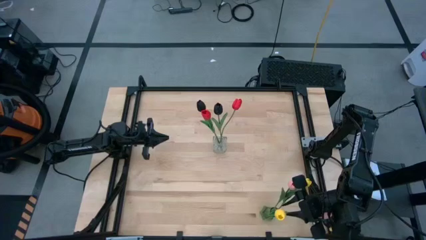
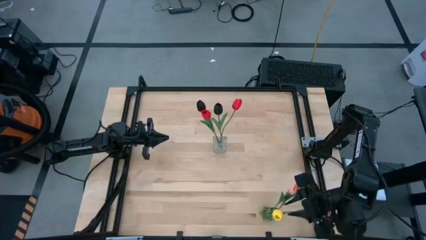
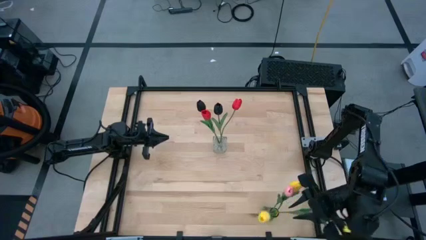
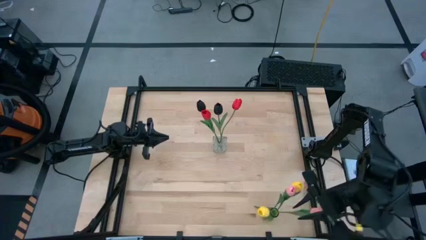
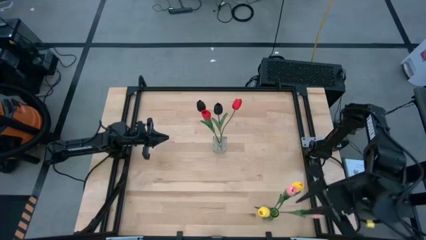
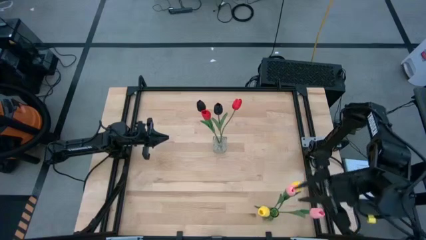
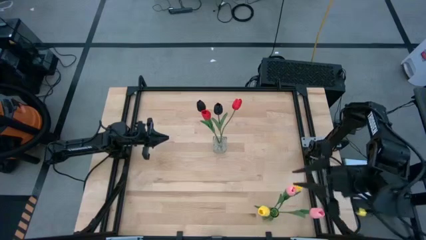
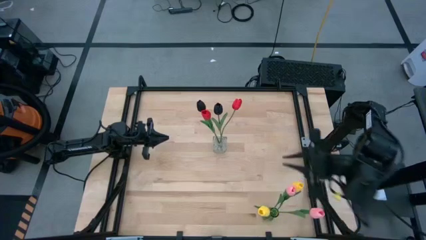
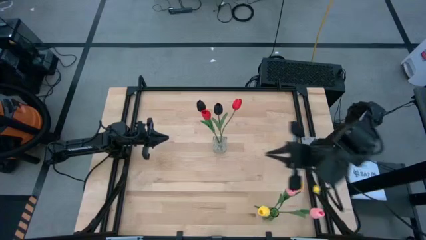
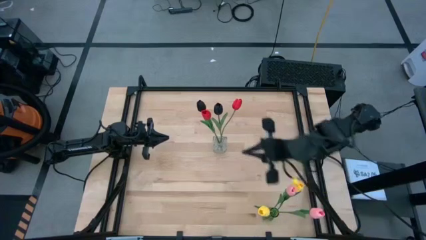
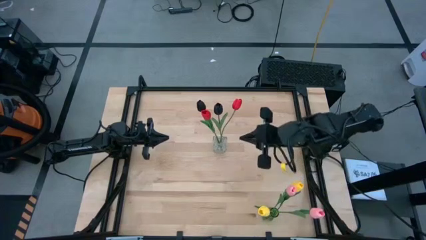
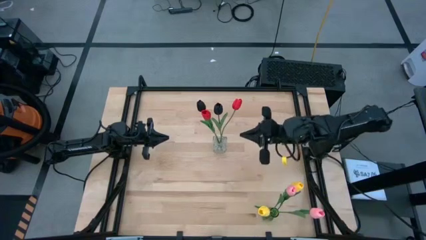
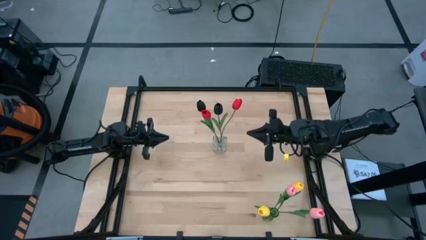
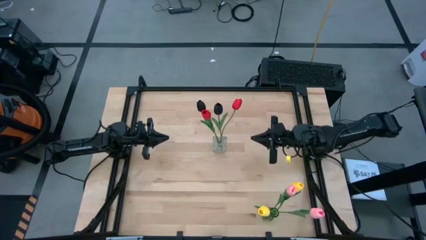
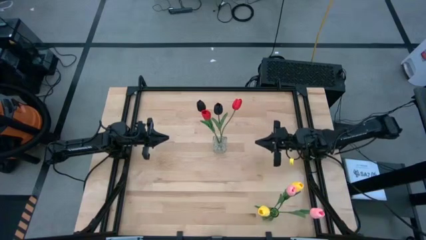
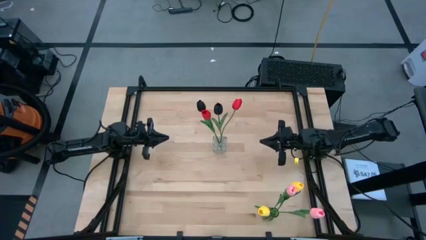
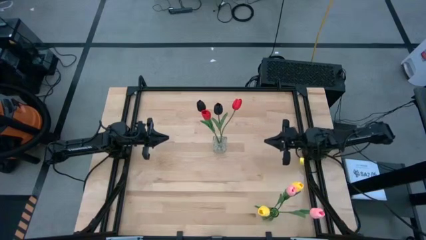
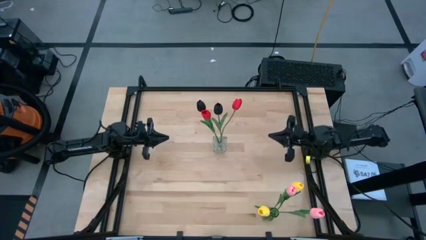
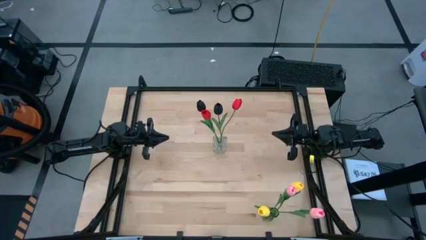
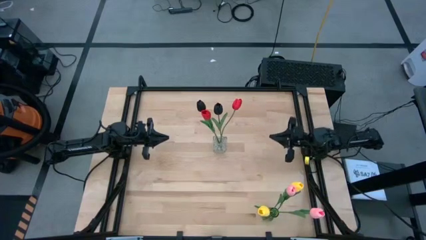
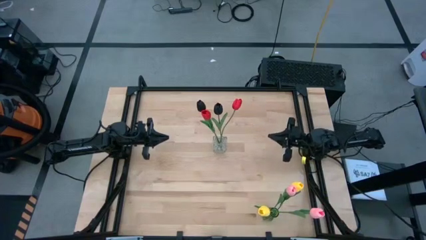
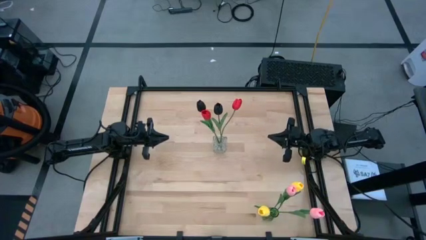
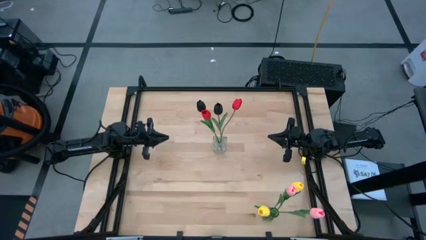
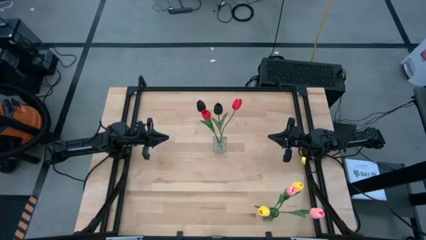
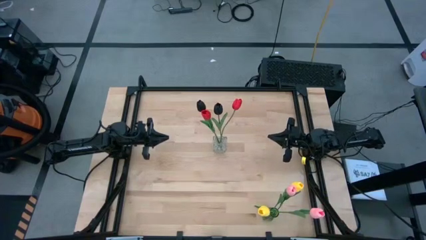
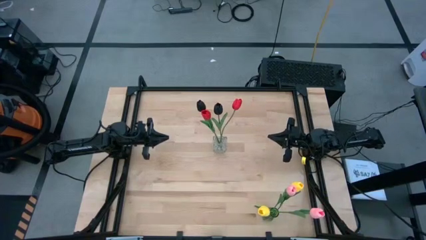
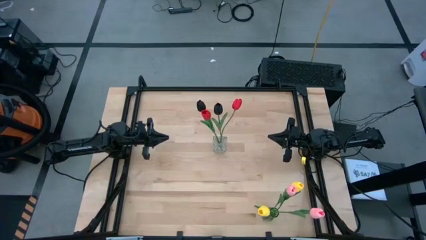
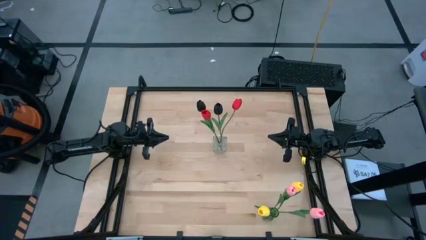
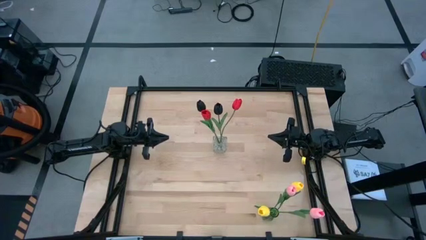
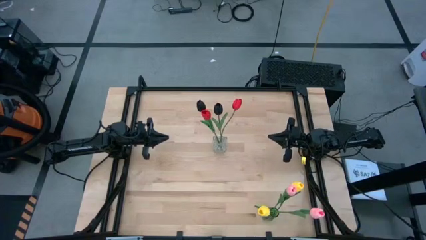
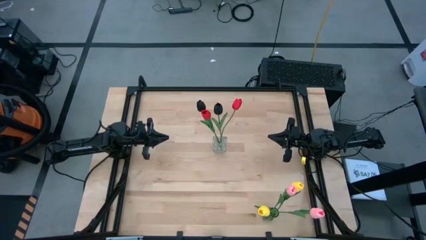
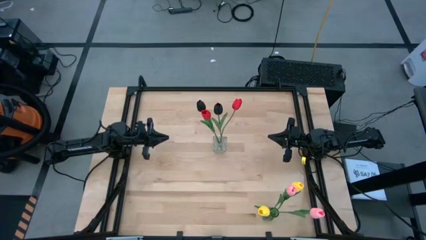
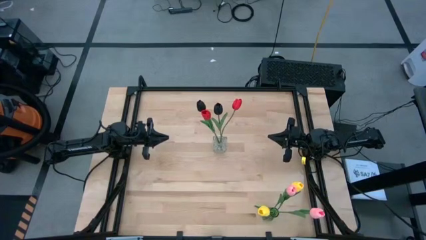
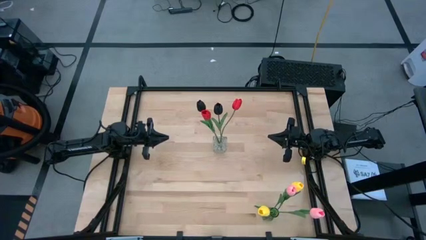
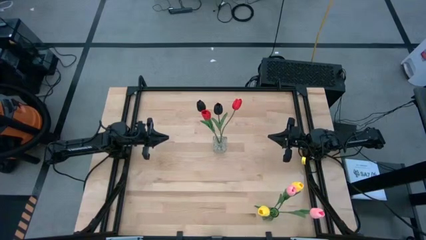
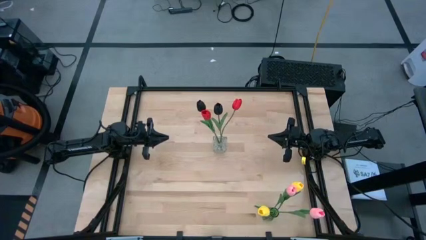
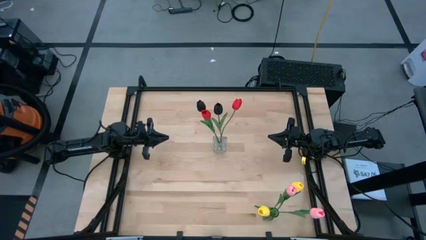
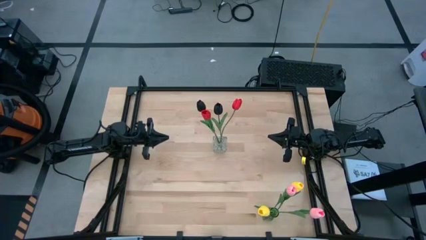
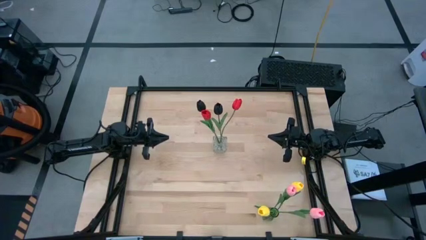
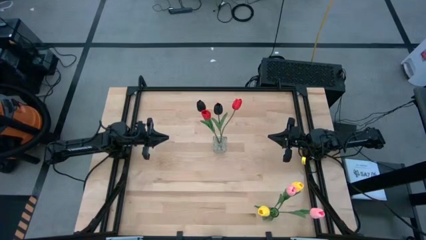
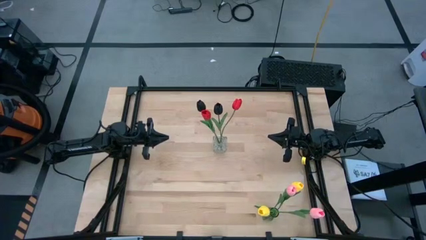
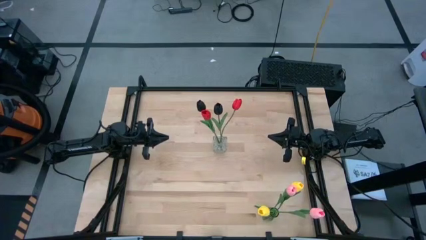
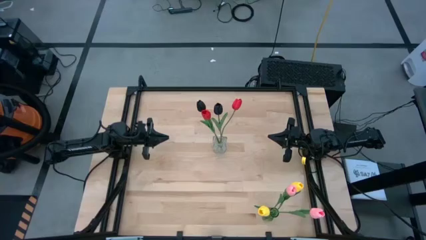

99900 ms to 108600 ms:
Task: Sort flowers into vase by color
Return to home position

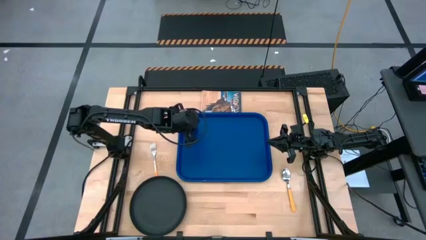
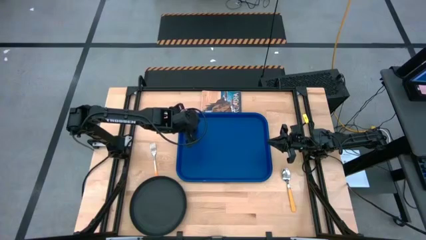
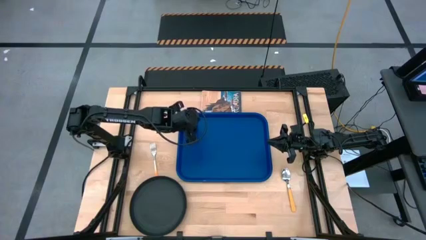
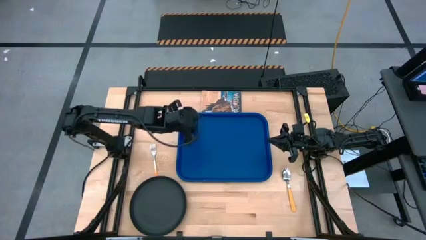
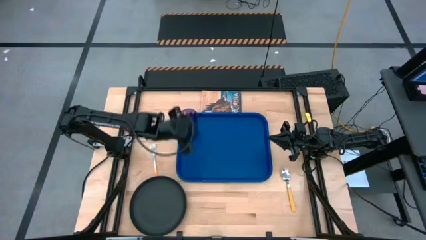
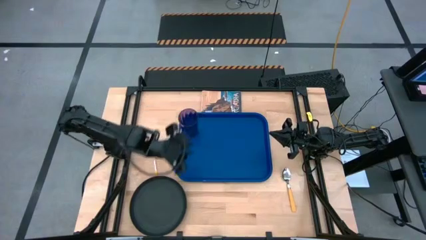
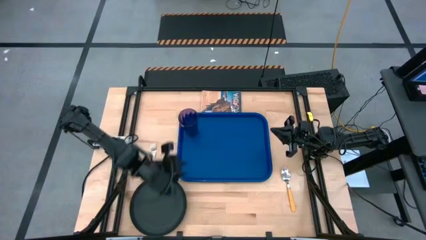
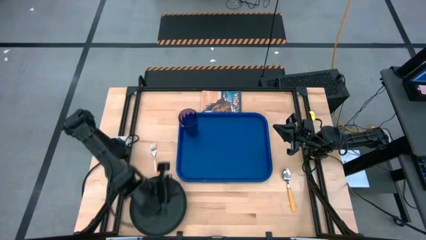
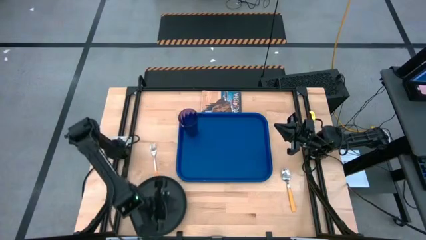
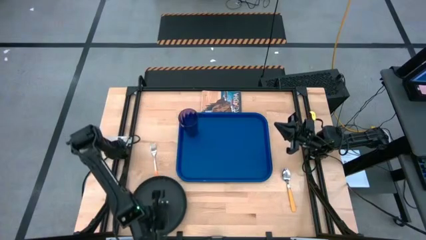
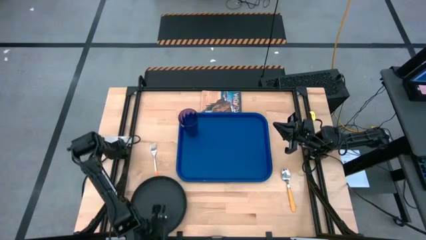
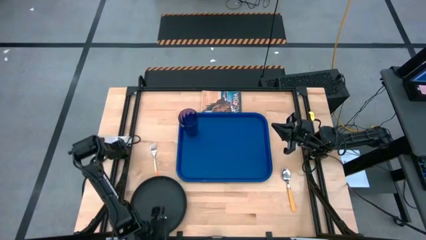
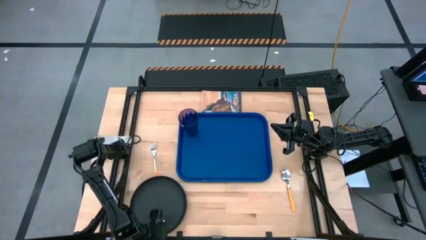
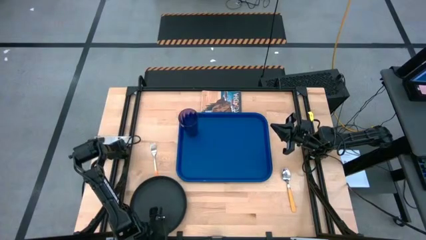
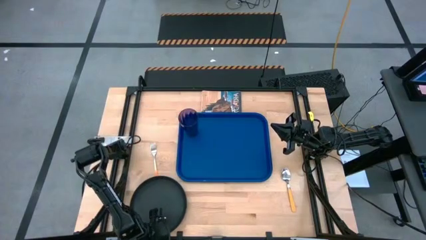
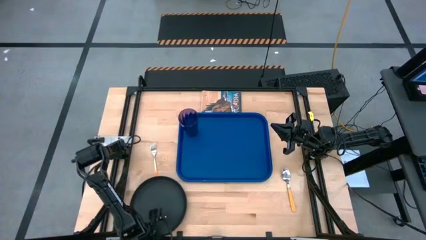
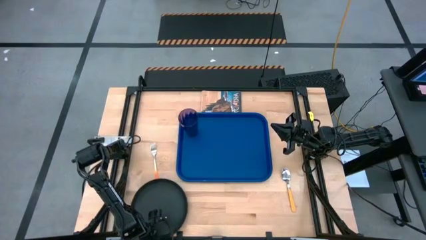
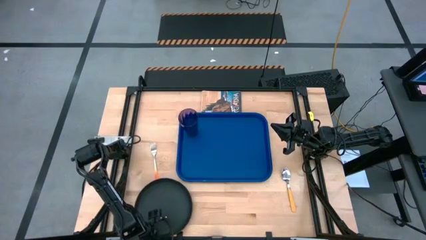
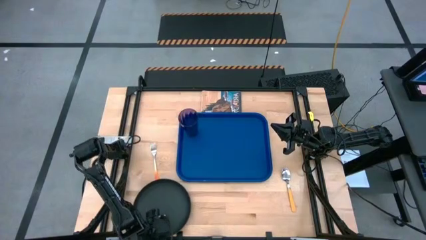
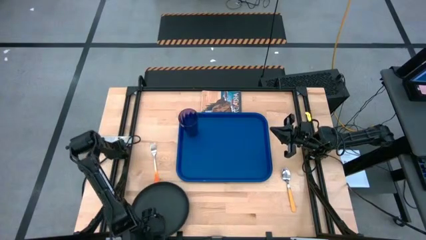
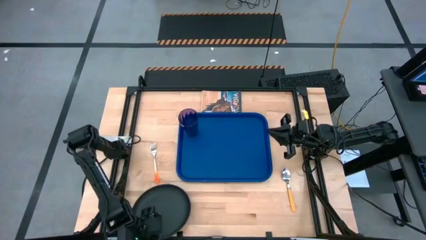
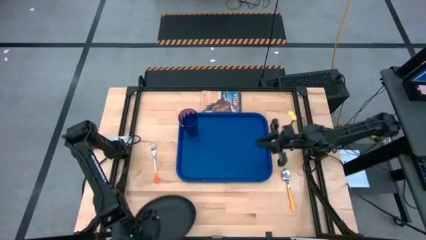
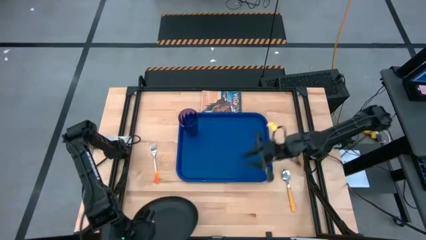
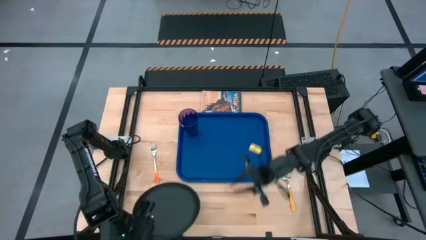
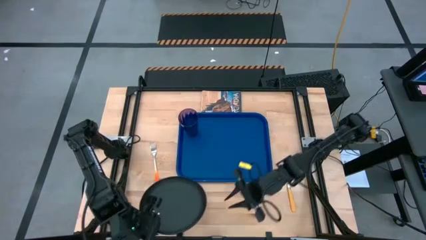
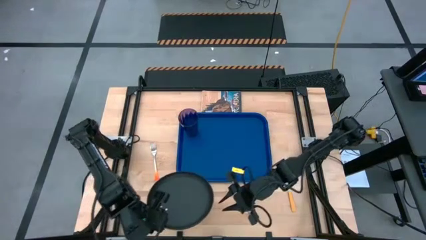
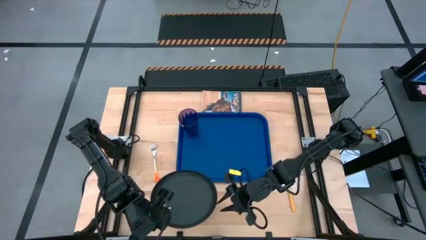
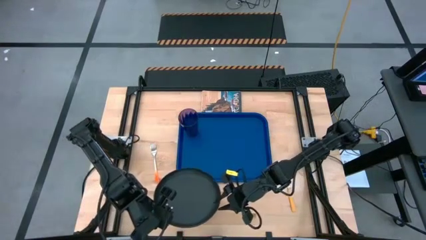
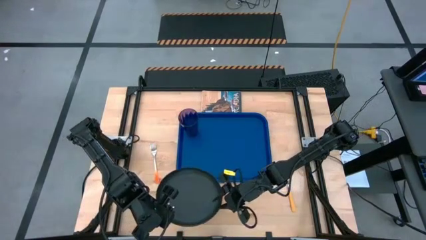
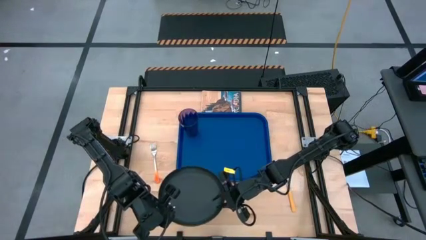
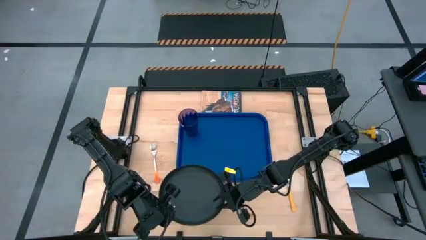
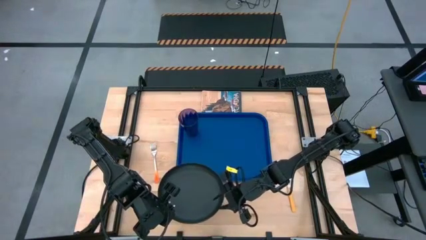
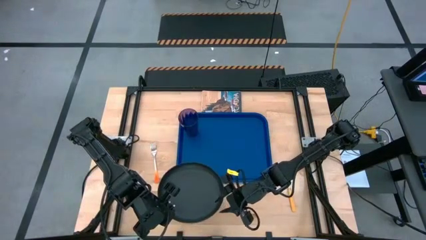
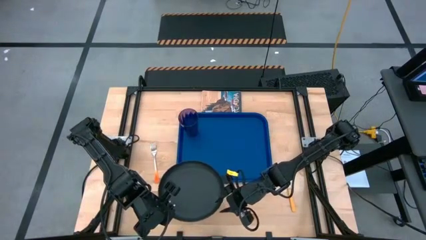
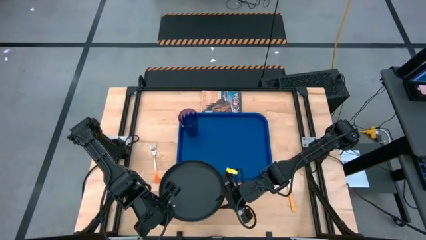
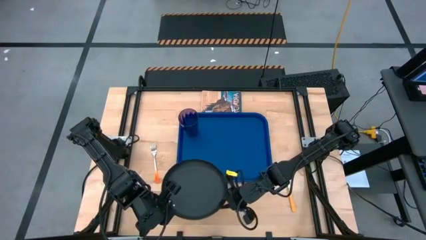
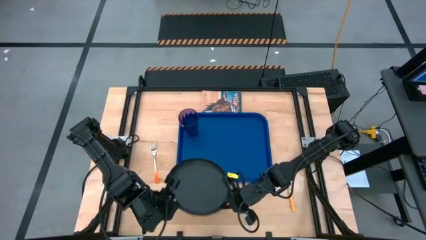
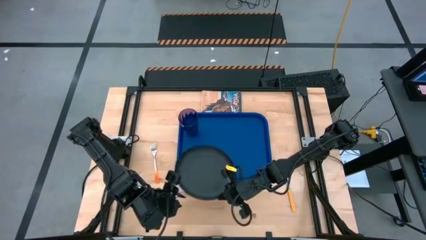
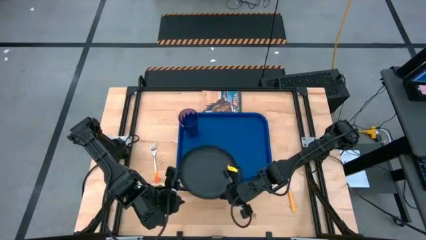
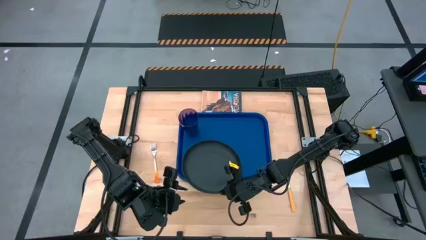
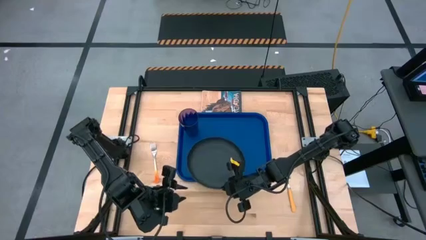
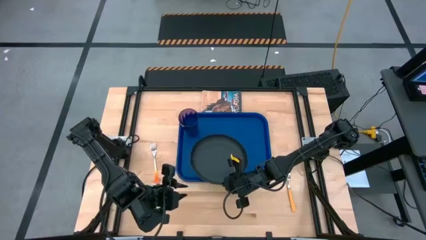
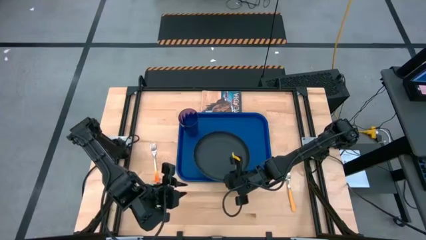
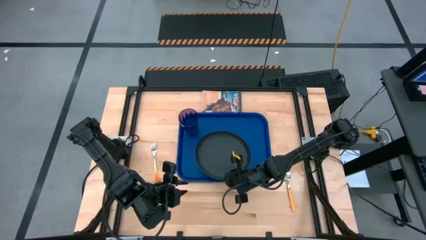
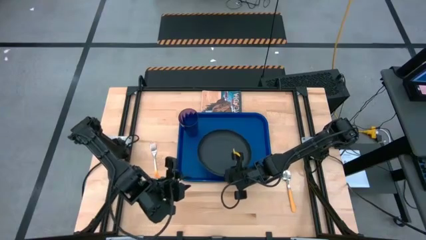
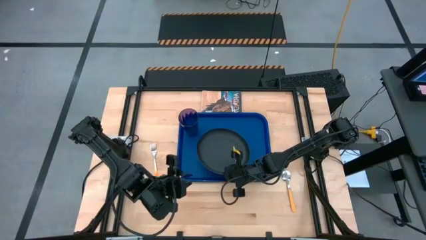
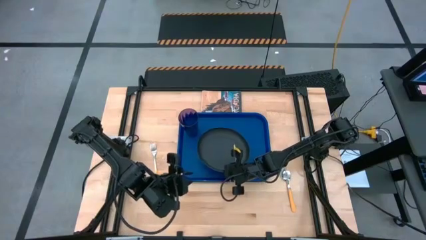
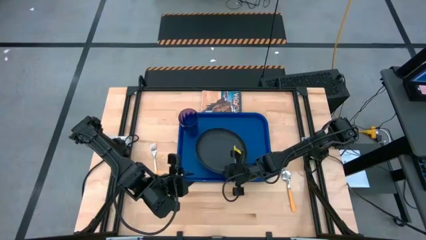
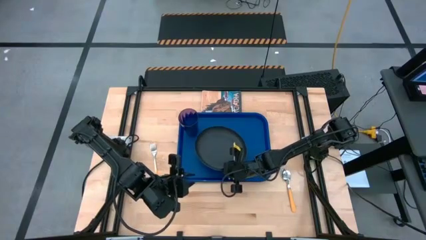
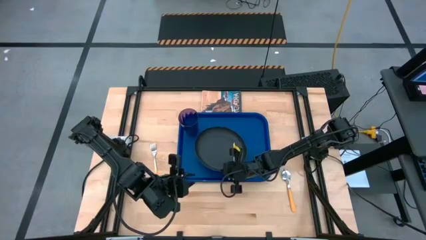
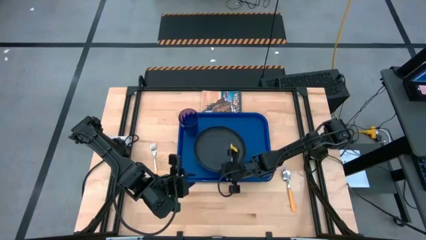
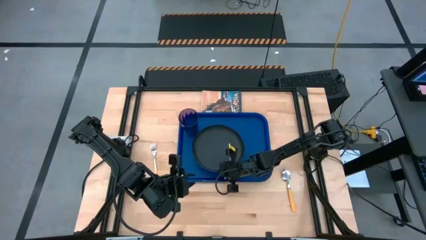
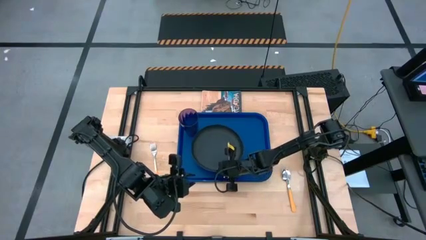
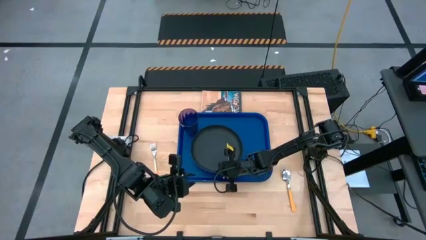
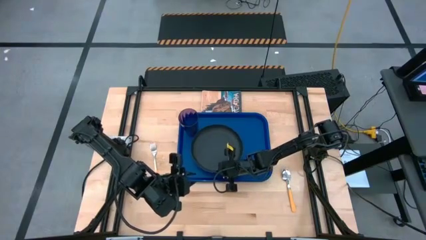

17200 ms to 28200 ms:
Task: Pick and place plate/cup/fork/spoon on tray
Put the black plate on the blue serving tray to the bottom right of the purple glass
